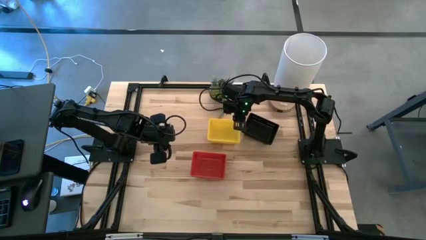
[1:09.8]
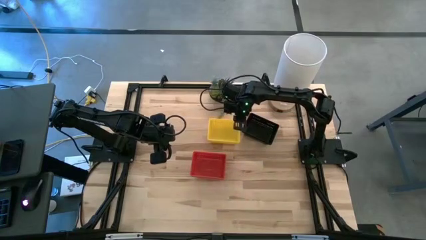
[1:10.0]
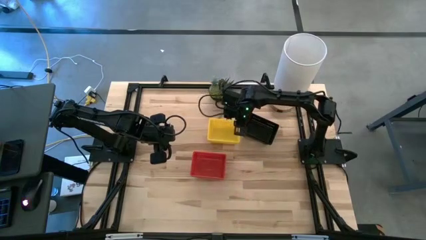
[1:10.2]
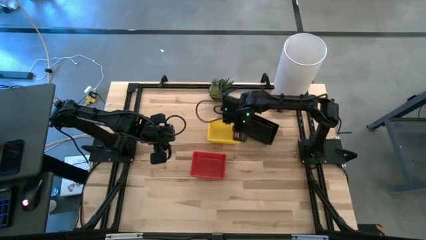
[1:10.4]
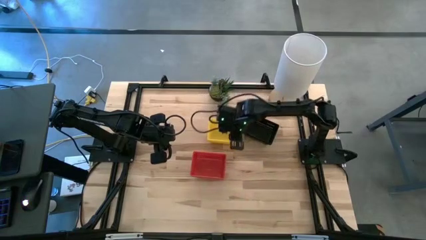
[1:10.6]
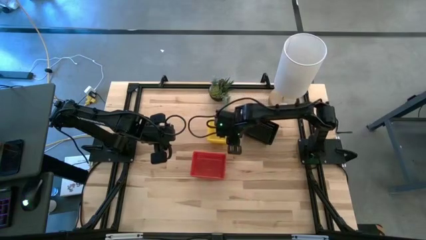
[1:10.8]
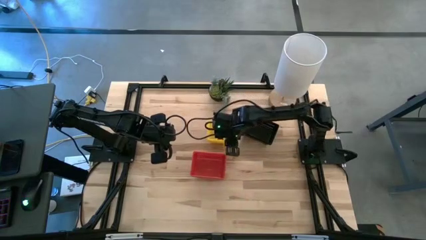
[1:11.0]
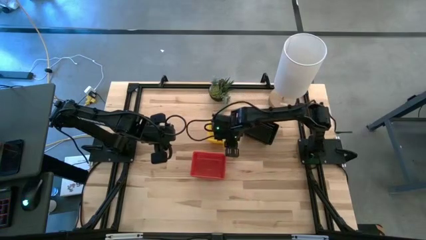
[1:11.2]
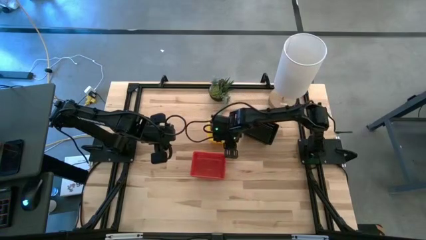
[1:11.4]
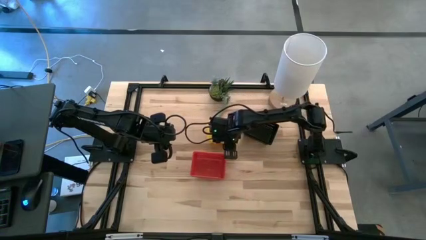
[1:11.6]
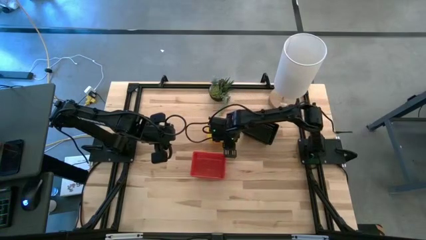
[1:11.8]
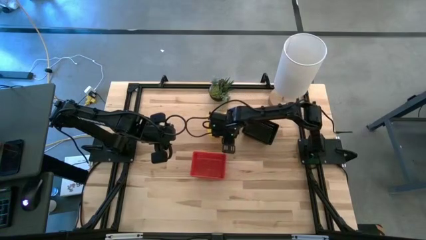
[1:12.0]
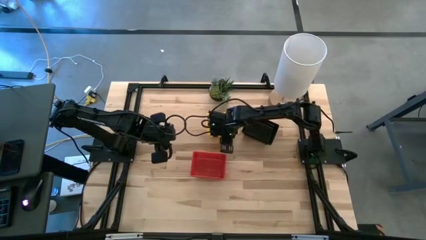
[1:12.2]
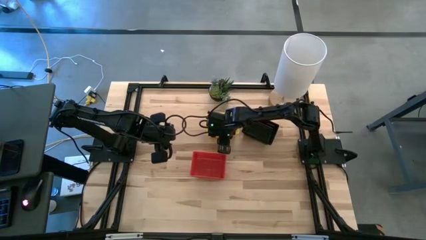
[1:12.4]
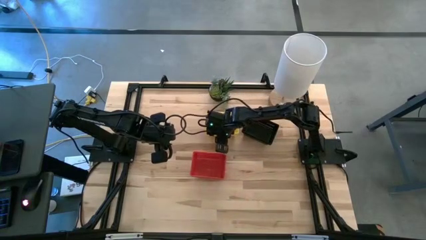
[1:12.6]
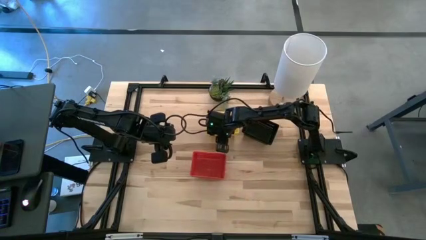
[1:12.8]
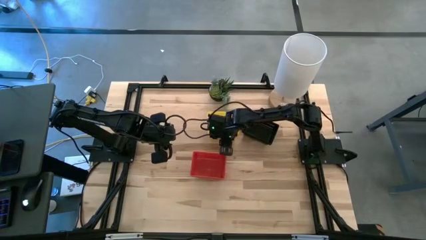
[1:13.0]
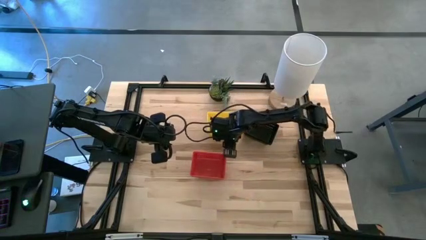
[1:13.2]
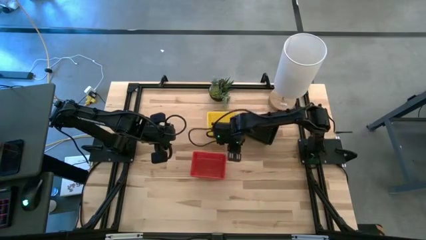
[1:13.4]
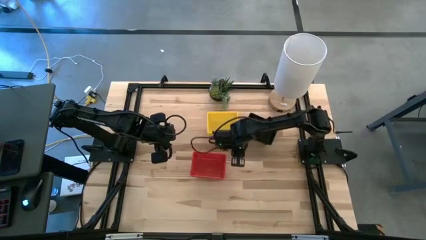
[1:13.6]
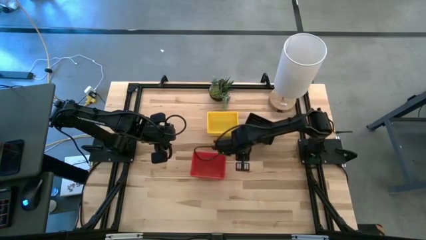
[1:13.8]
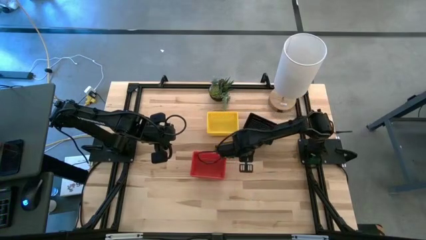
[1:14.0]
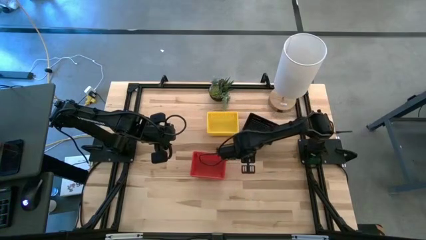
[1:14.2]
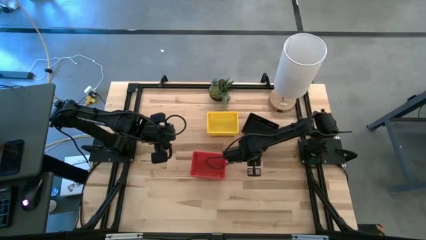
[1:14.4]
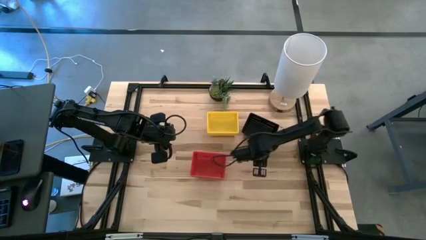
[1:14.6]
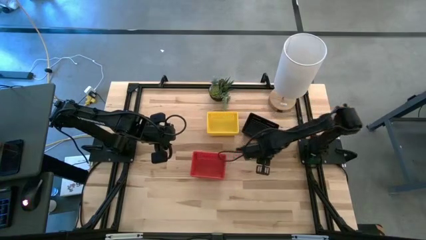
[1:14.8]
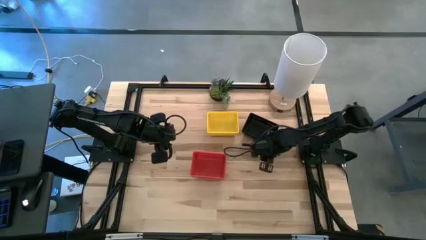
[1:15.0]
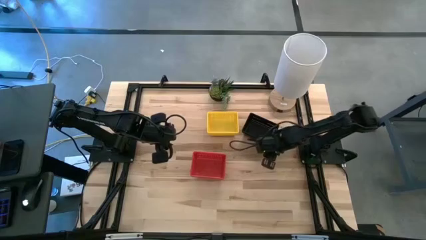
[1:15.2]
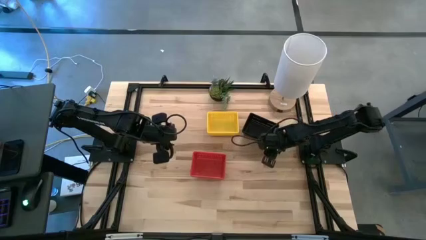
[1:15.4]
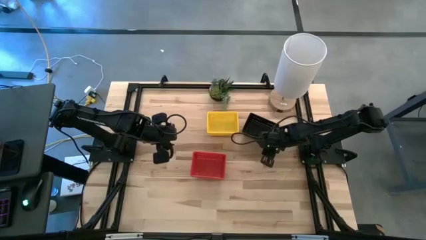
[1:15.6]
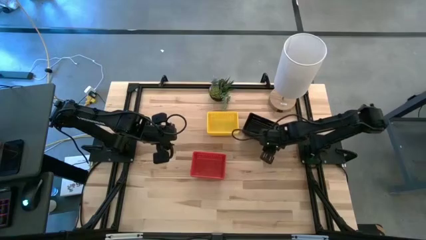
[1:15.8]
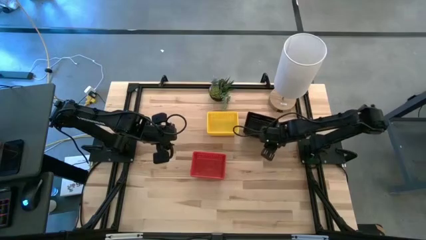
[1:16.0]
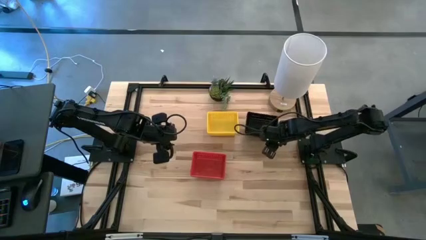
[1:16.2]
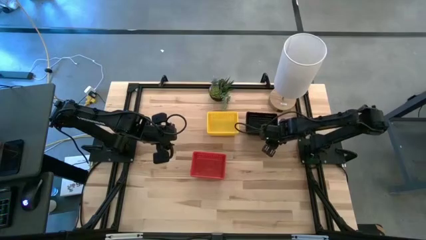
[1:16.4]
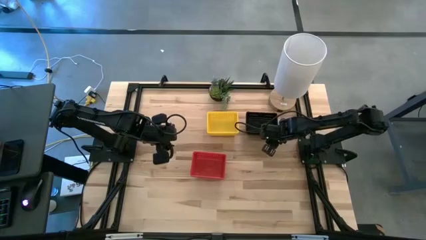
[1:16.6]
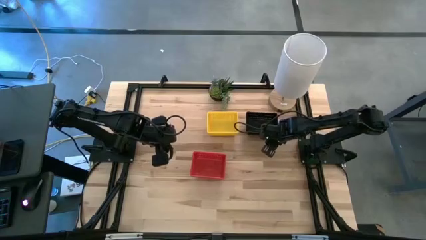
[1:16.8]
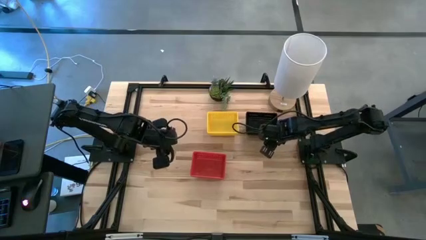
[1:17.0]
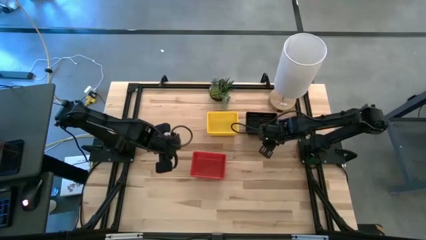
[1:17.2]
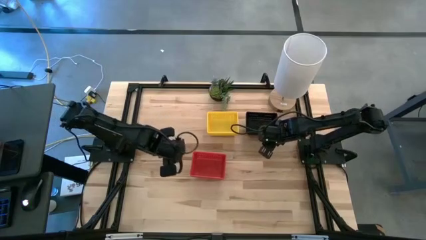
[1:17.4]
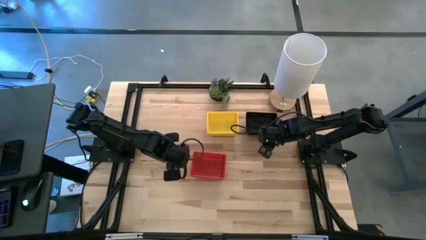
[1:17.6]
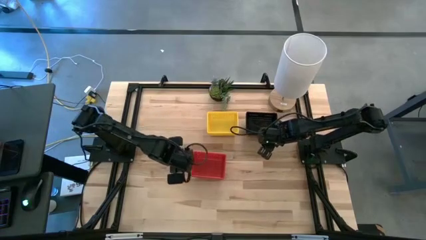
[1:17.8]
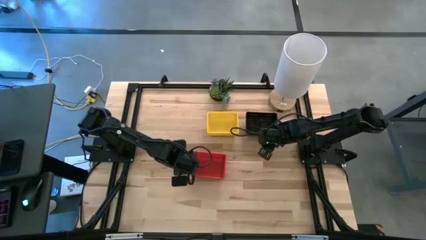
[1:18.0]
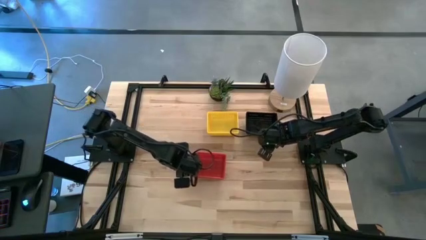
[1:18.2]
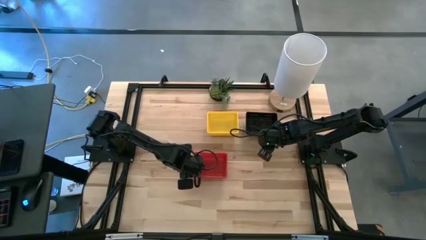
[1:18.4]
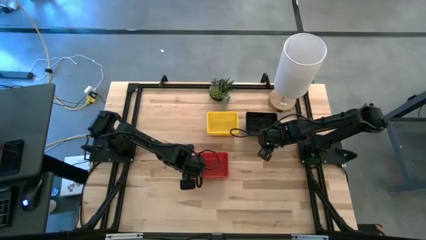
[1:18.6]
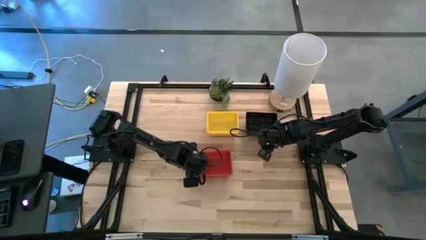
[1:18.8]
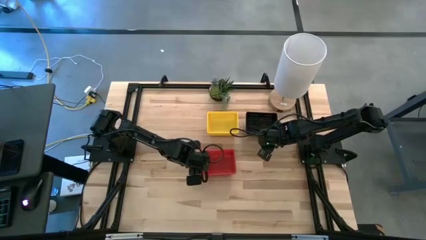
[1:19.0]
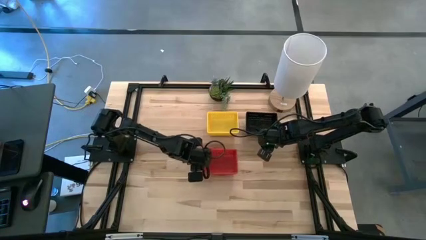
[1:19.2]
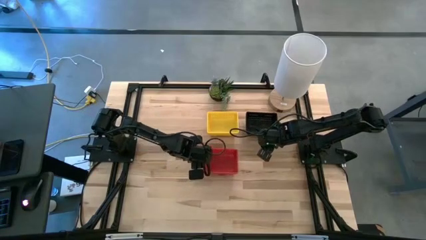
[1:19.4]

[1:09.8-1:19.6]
Adjust the stacked bins on the table

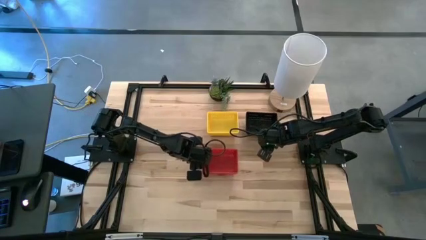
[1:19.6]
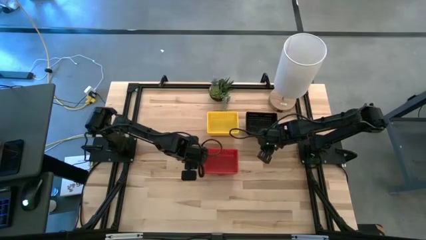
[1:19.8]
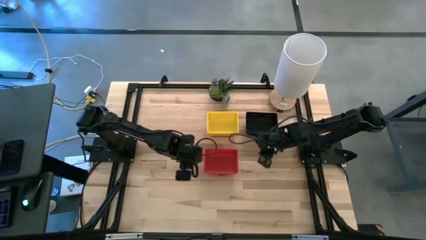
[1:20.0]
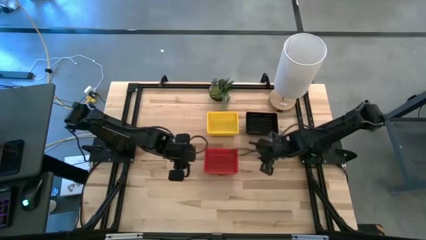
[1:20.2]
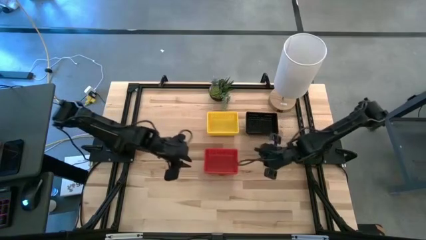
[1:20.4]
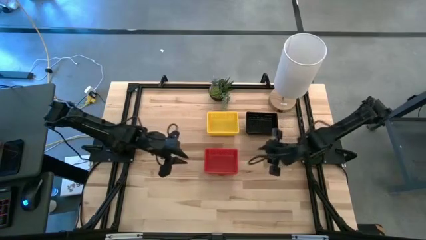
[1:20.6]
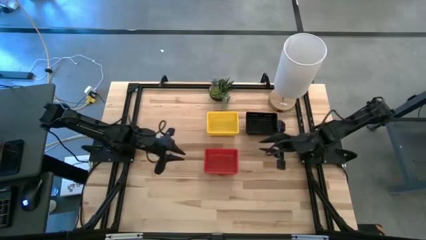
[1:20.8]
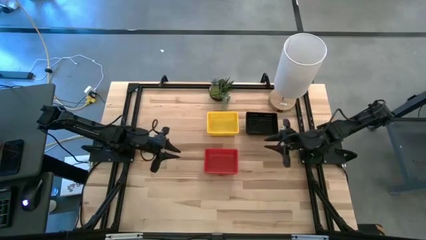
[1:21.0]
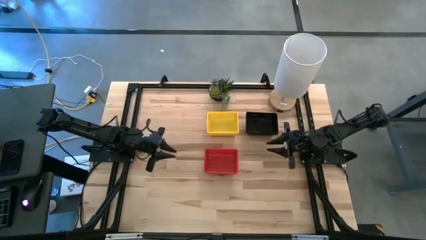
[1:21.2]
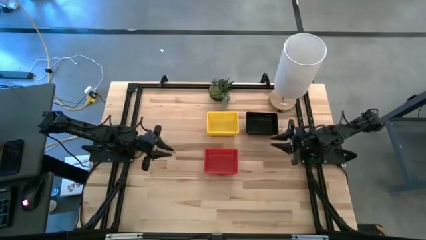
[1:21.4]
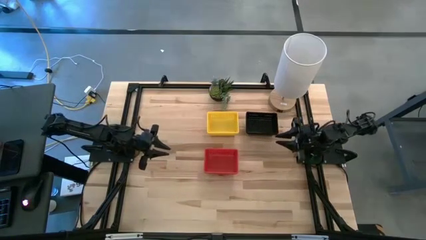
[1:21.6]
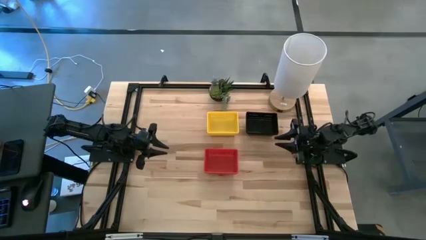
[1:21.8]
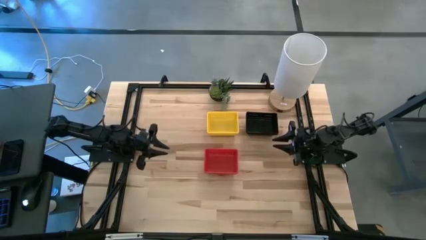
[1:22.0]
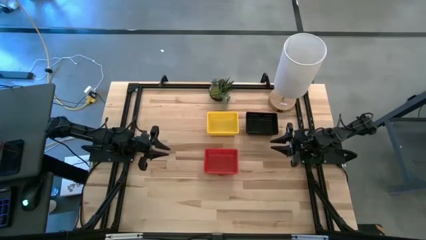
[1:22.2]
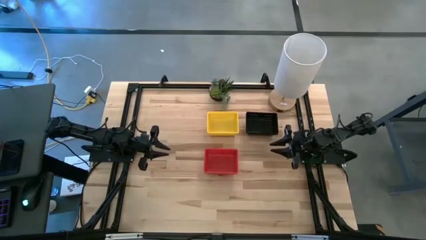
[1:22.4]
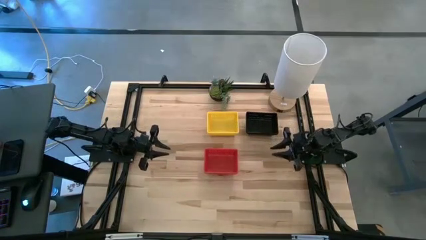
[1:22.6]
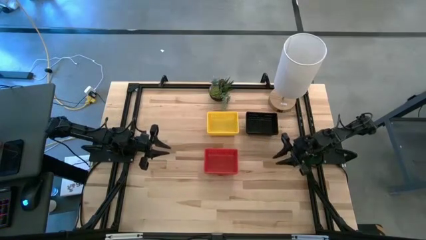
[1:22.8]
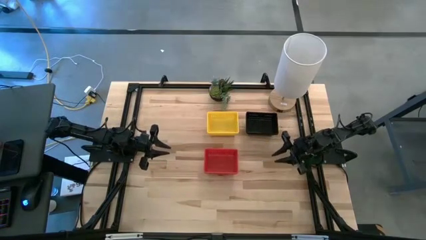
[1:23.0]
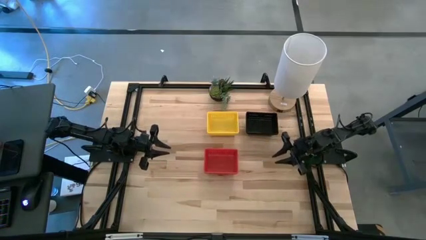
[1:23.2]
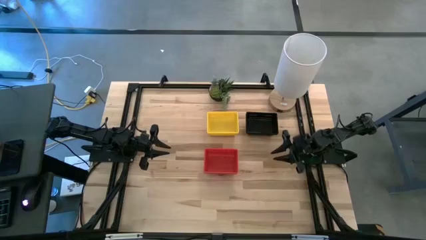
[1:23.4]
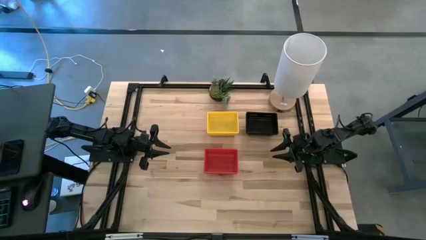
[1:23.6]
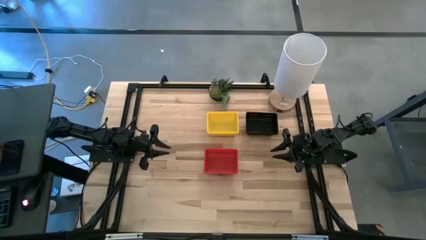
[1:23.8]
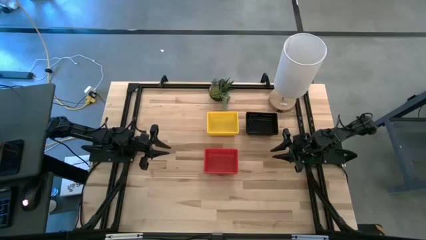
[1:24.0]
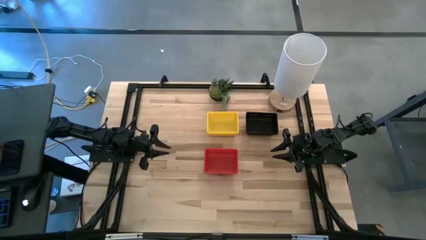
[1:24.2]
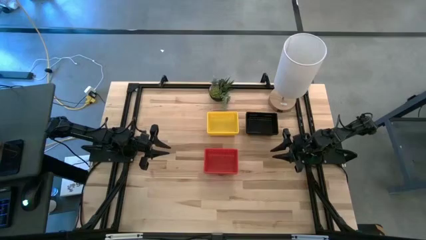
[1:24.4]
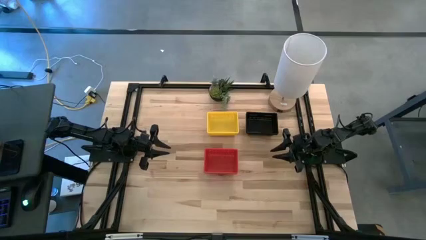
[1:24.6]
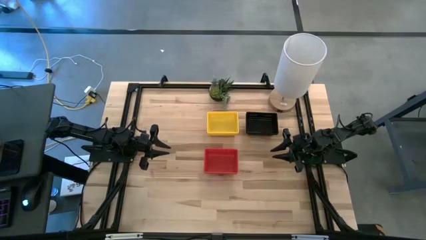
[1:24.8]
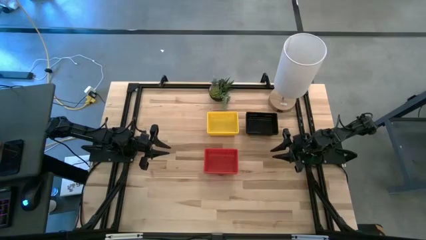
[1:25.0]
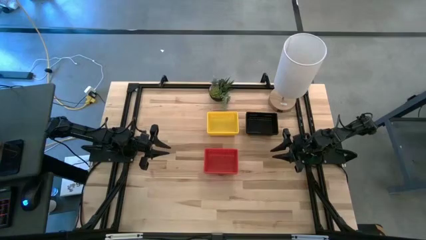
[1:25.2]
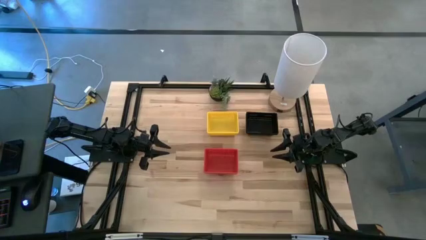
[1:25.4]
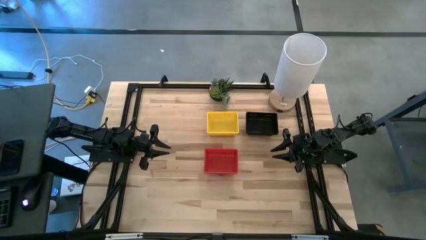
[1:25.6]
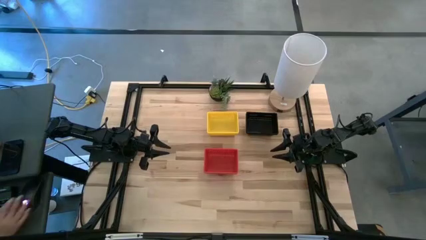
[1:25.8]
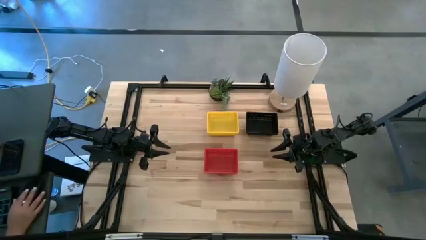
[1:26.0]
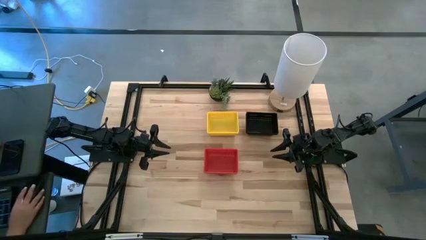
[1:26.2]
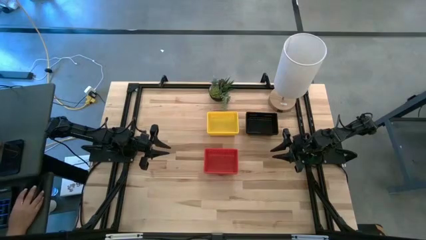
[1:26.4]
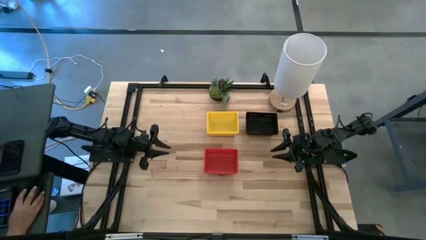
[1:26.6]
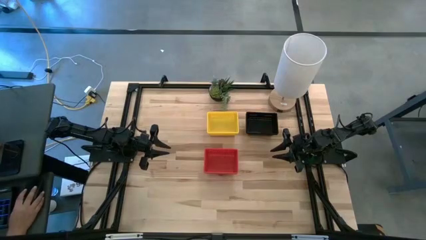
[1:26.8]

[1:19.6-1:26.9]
Return to Home Position

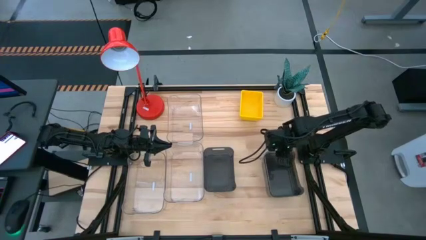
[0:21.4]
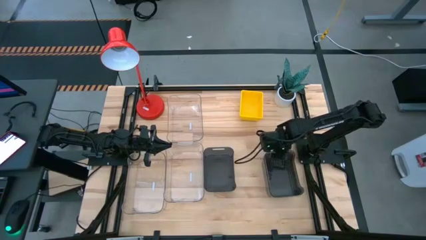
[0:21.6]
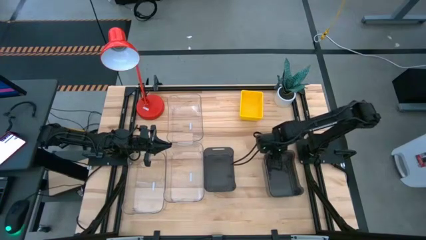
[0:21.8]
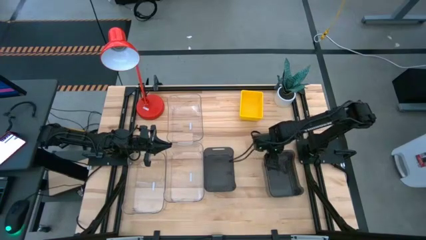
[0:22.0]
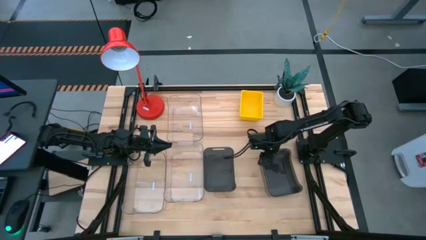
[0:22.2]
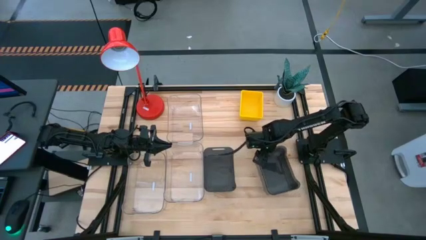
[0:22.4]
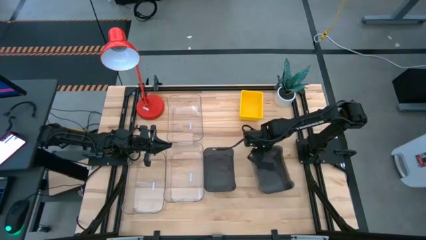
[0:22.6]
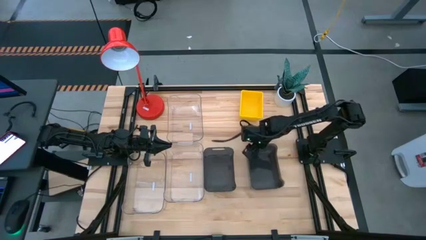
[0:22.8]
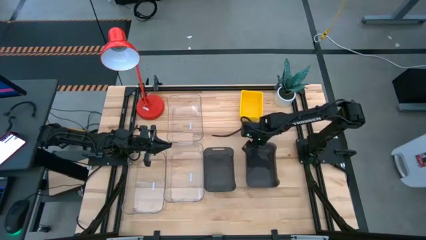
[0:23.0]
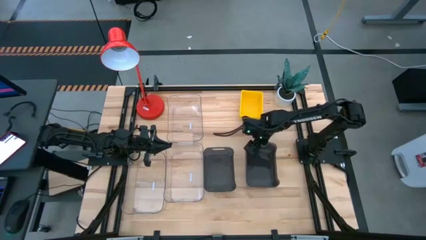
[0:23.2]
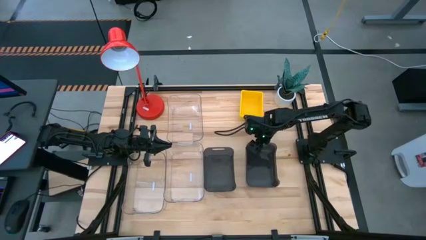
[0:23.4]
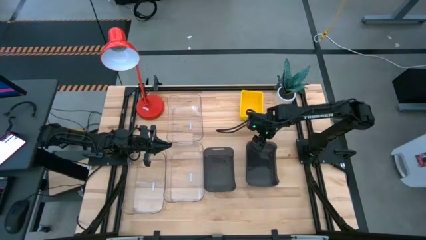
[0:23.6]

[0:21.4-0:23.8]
Adjust the black bins
